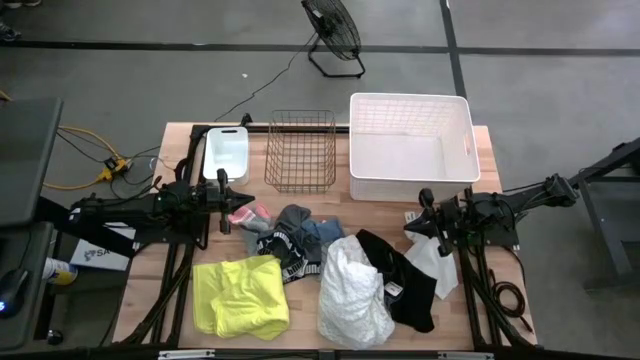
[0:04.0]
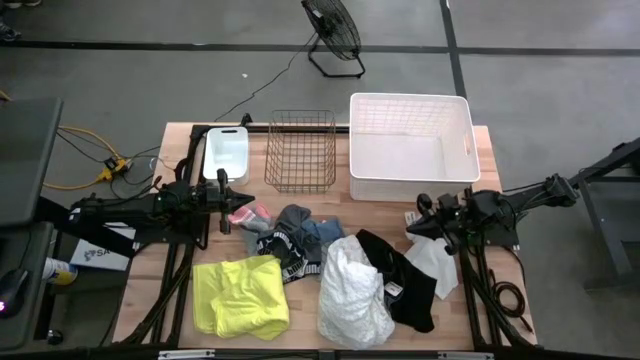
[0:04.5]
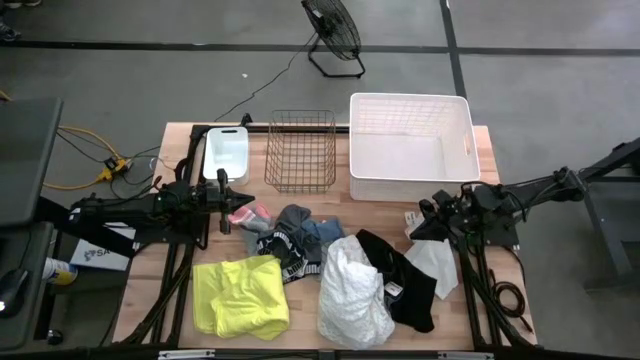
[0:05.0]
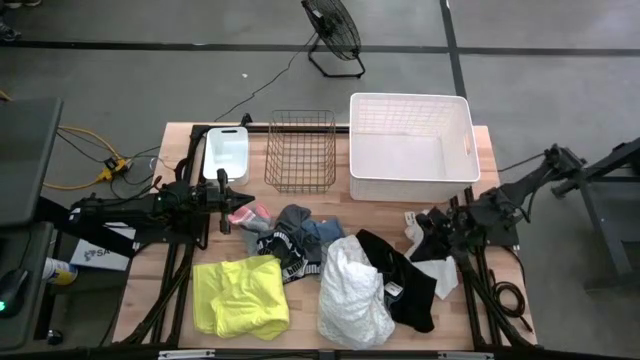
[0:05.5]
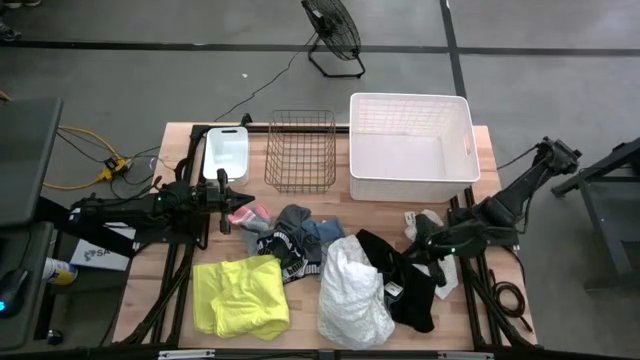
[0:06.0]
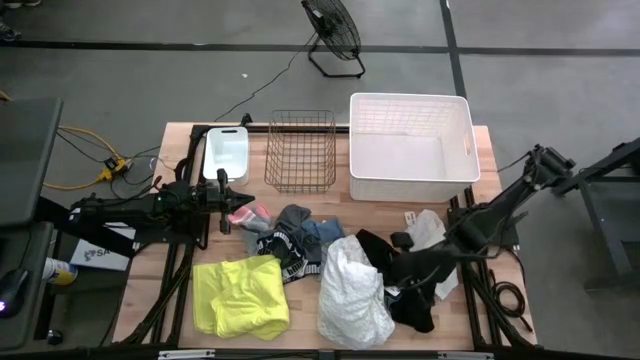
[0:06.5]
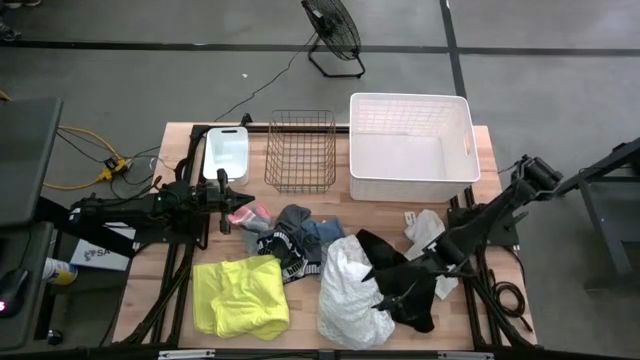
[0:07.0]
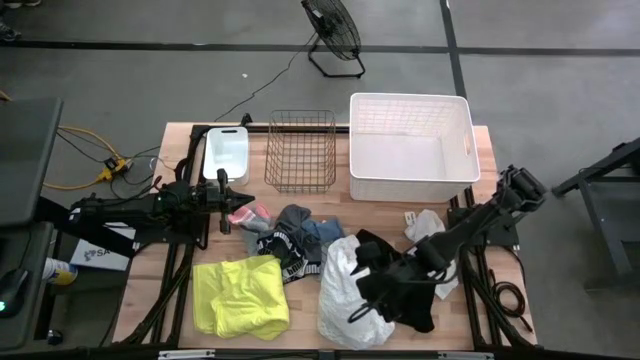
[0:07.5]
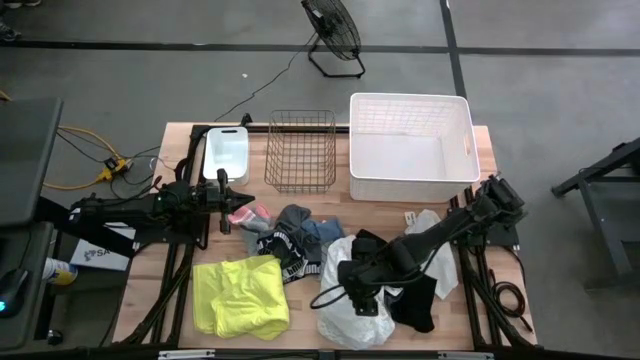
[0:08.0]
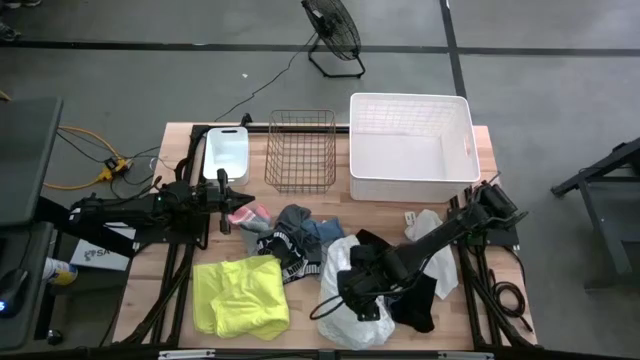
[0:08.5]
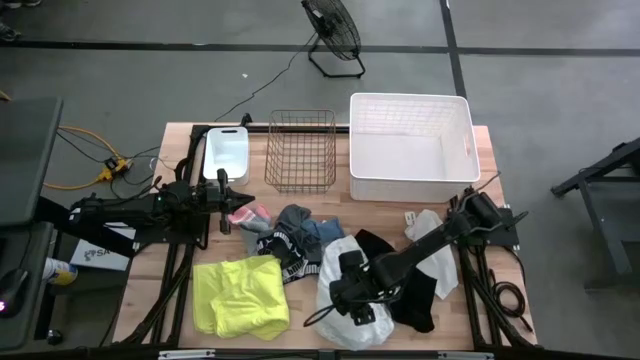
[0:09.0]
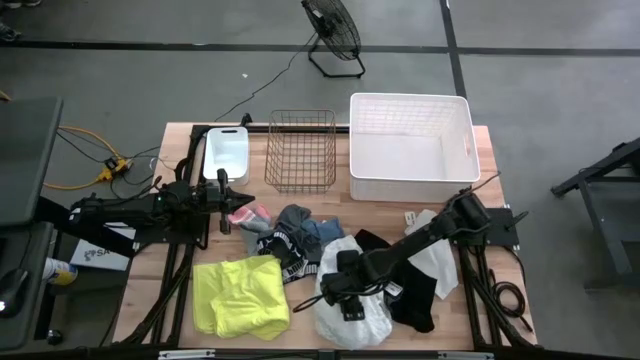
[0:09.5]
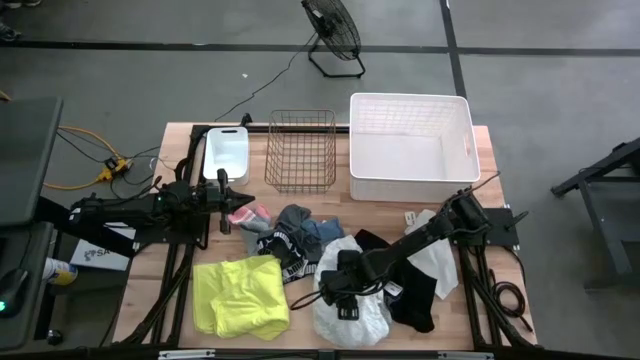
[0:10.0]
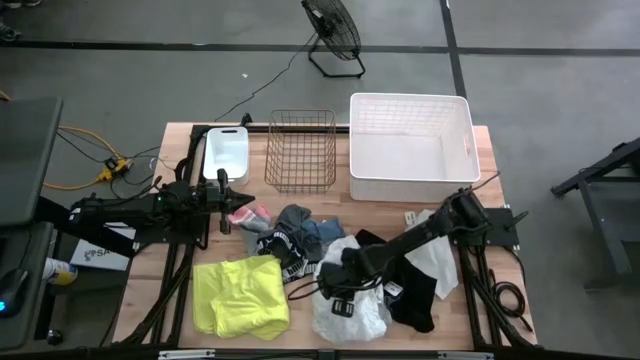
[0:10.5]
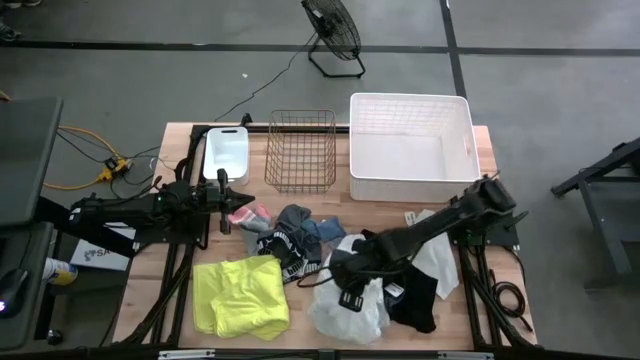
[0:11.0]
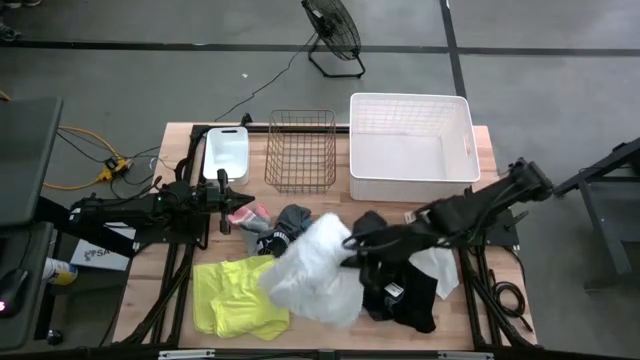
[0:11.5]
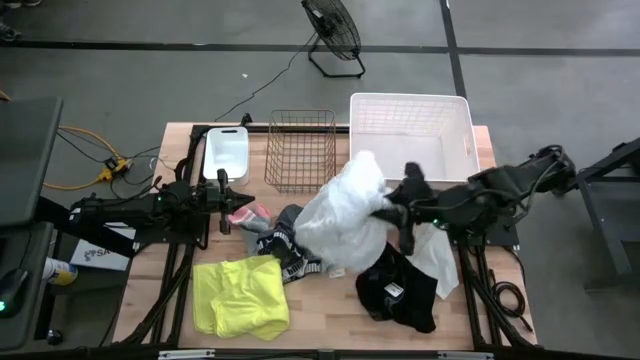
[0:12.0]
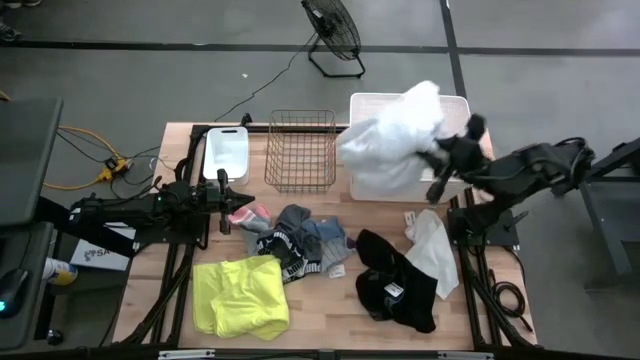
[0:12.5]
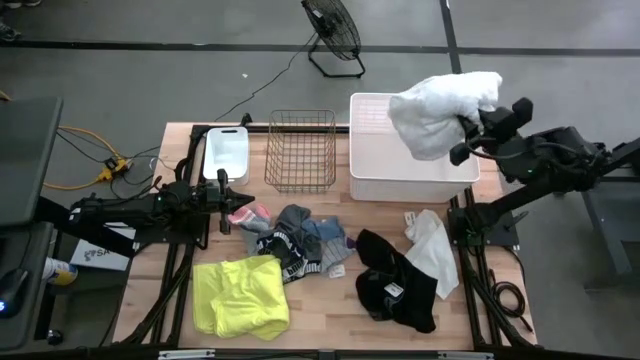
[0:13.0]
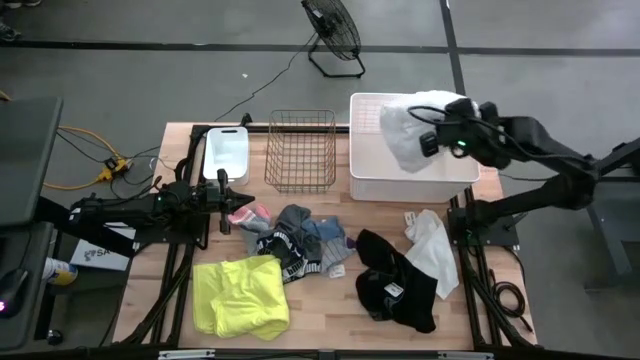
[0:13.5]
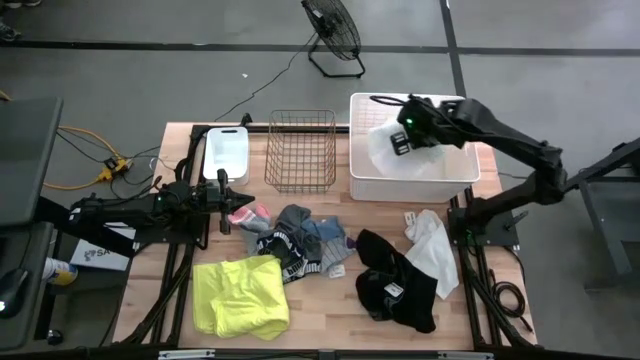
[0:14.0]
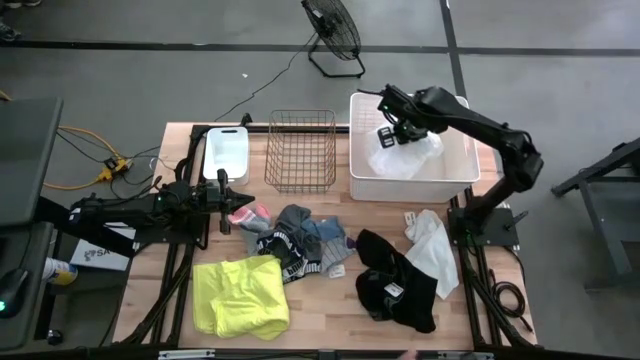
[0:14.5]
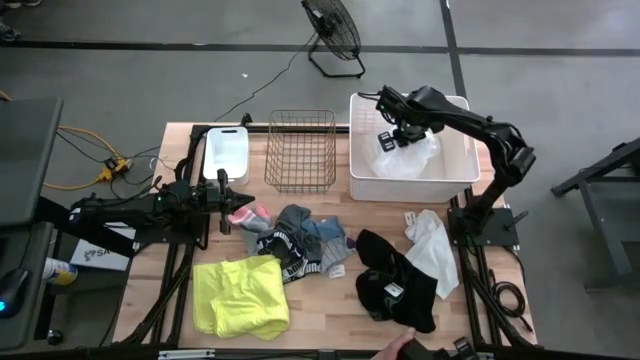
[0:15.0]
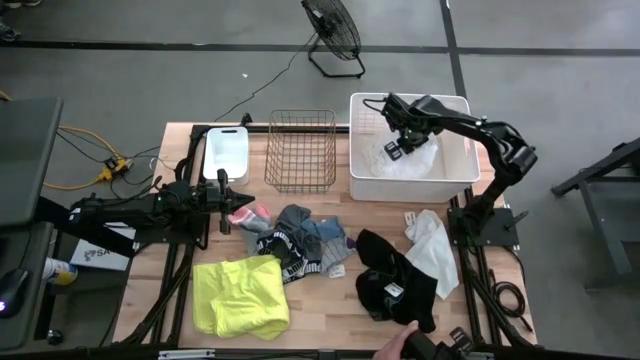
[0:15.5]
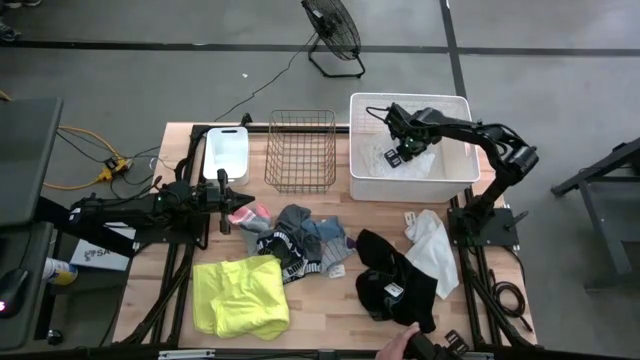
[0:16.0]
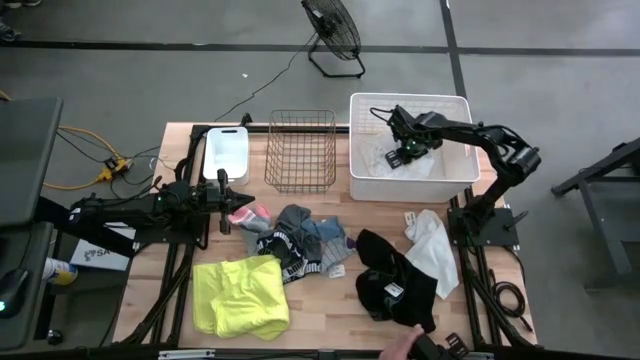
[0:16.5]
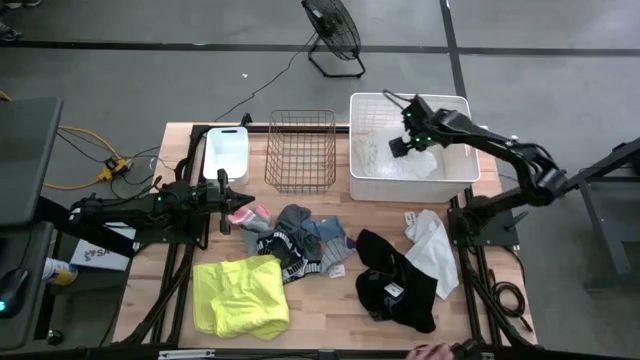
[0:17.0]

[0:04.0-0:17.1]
Task: Pick & Place Cloths
Put the white shirt into the right white bin

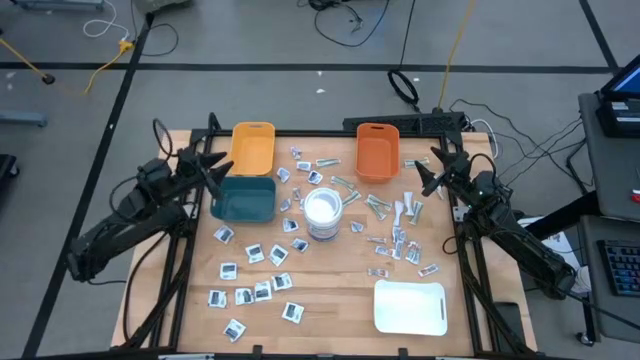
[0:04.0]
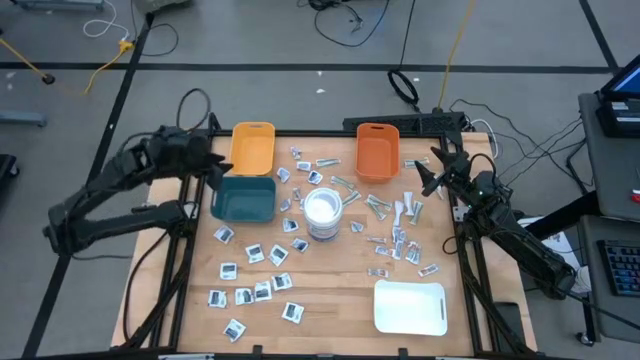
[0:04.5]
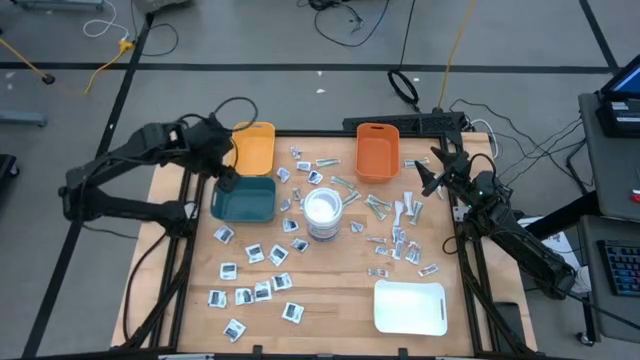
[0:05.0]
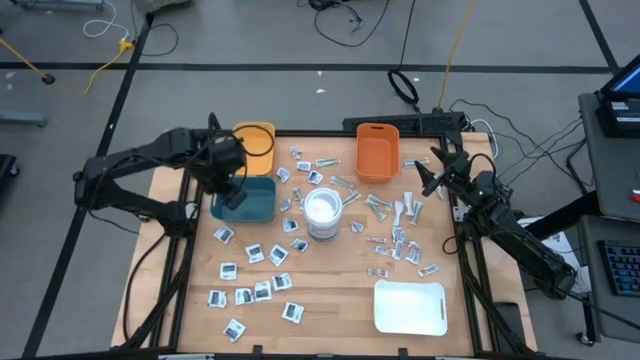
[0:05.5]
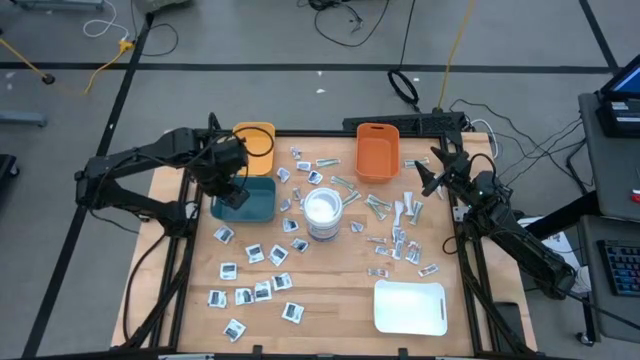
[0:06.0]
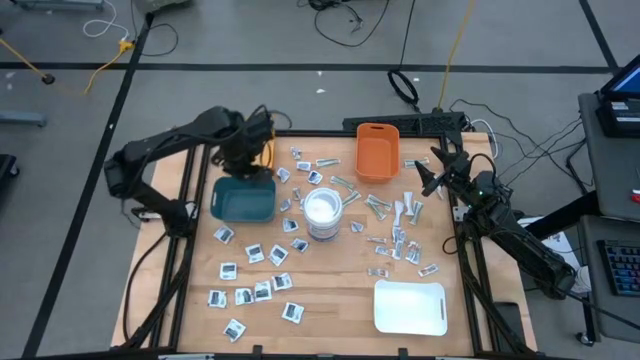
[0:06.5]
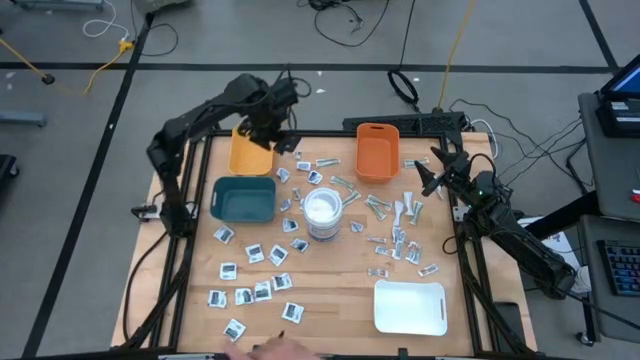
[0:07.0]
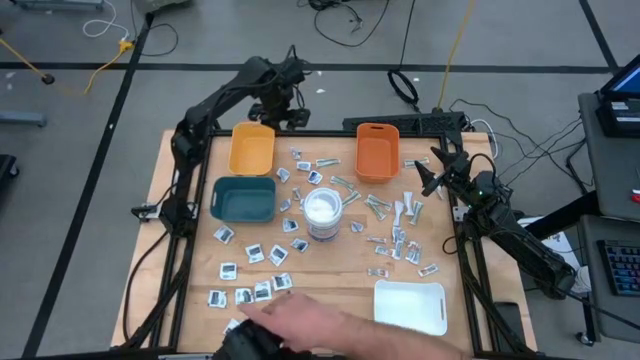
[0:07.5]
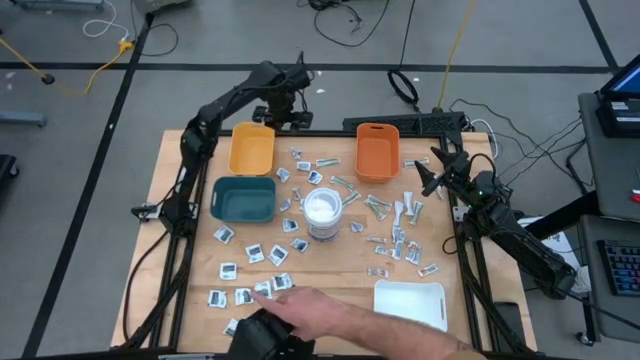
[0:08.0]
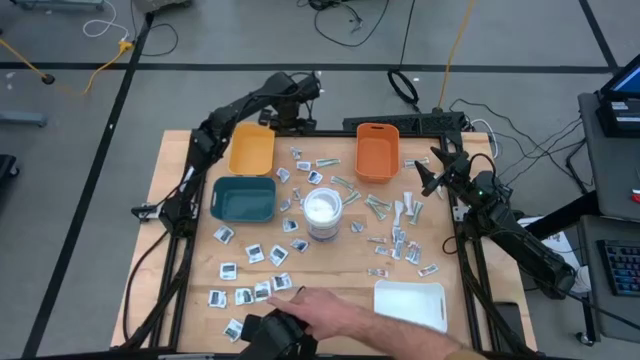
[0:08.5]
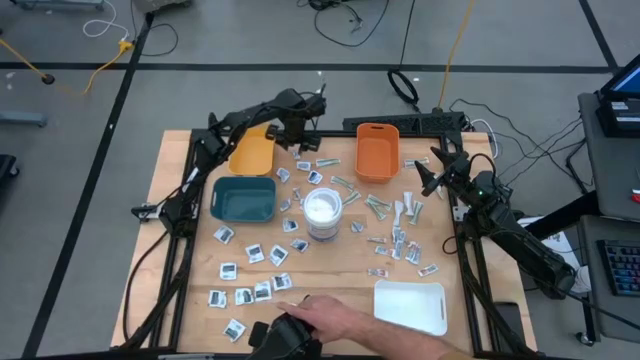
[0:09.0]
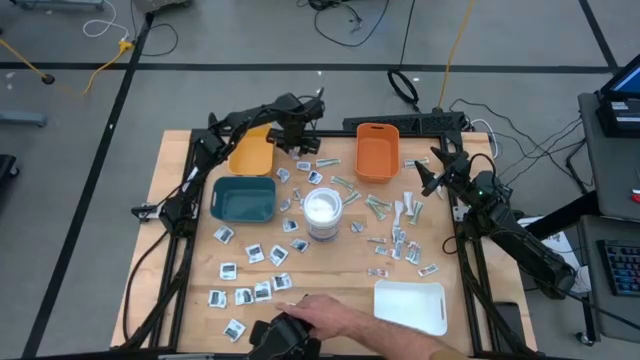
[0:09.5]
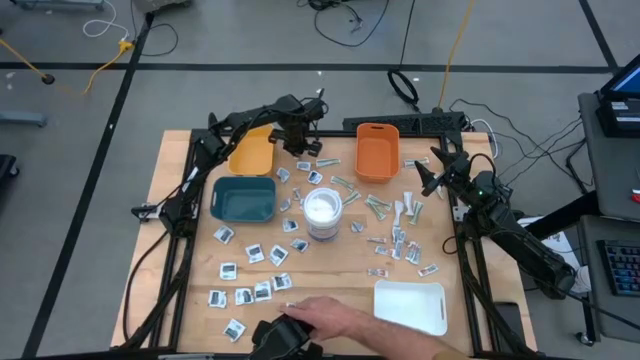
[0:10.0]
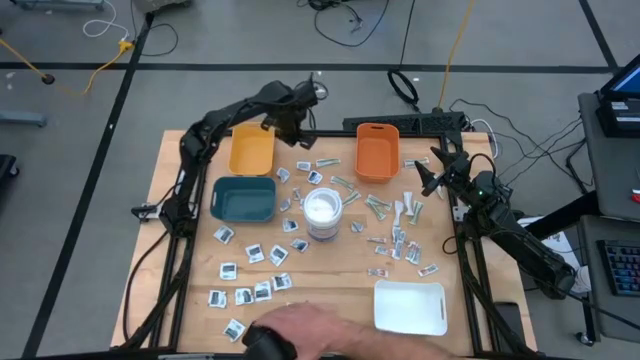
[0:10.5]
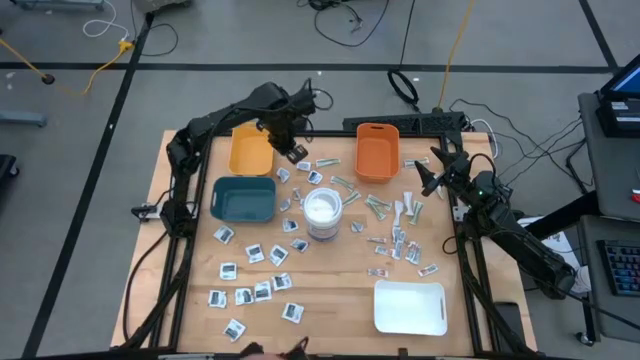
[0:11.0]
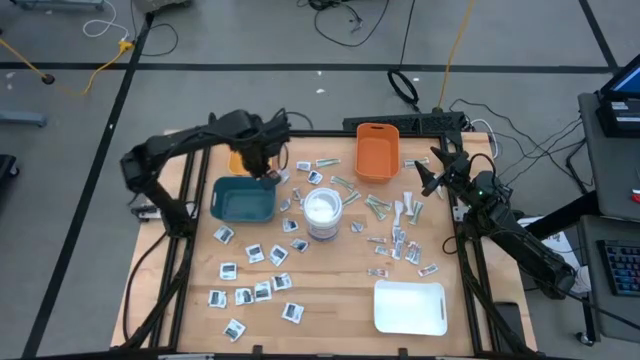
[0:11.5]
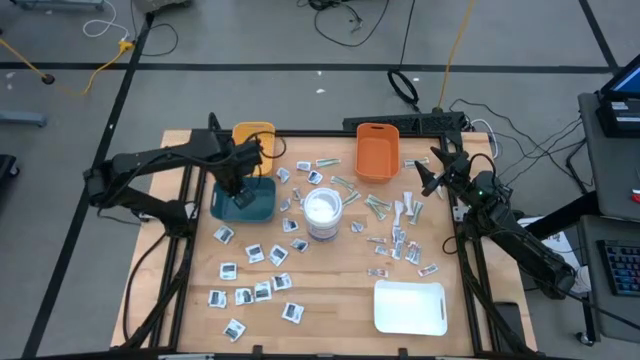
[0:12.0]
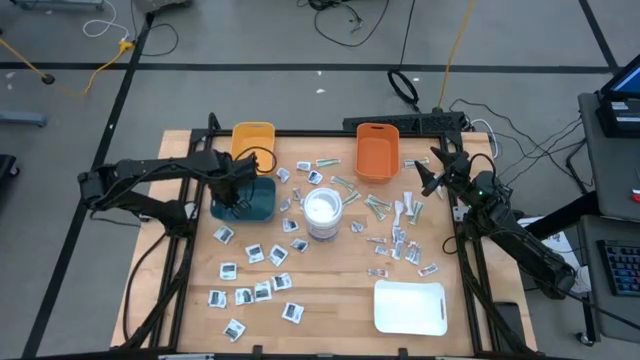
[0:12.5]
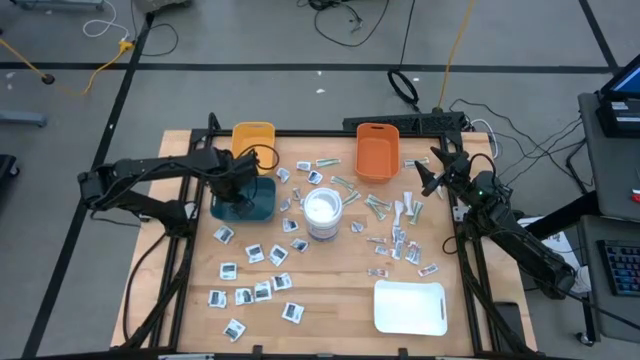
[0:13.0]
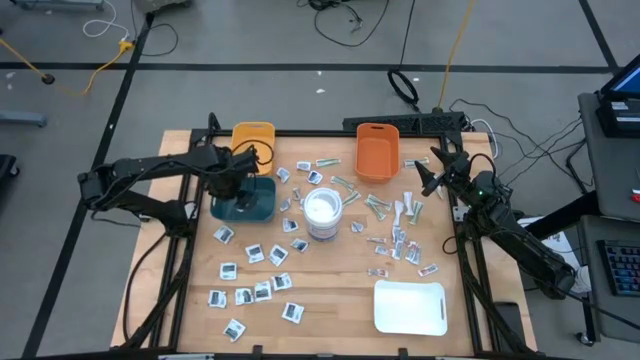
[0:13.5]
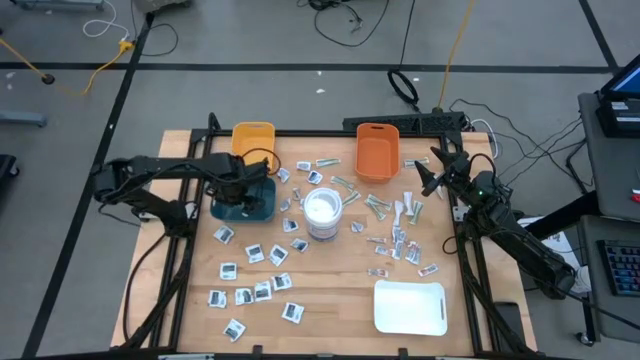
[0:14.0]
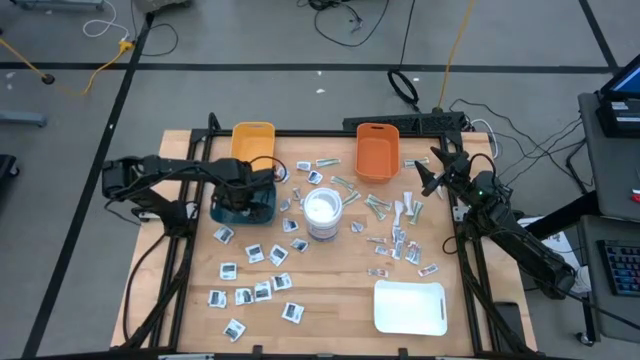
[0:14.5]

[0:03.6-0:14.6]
Task: Pick & Place First Aid Supplies
Put the blue pad into the blue bin
